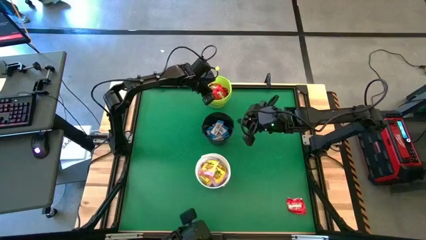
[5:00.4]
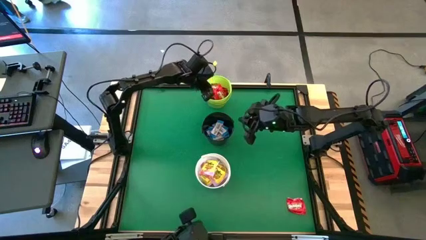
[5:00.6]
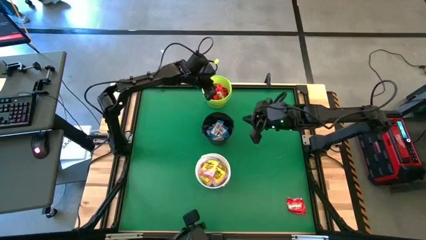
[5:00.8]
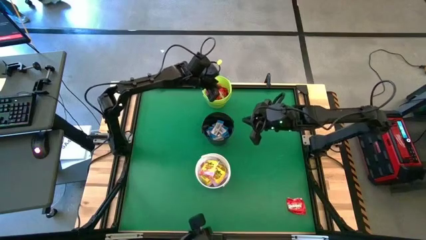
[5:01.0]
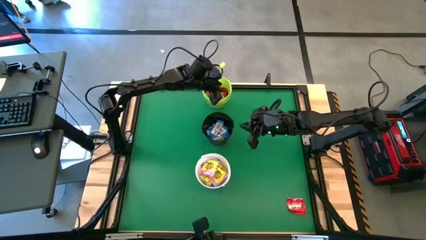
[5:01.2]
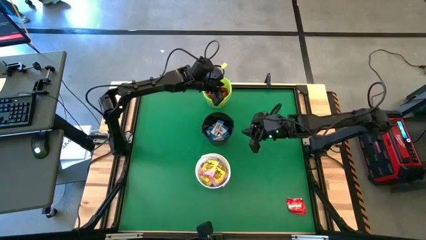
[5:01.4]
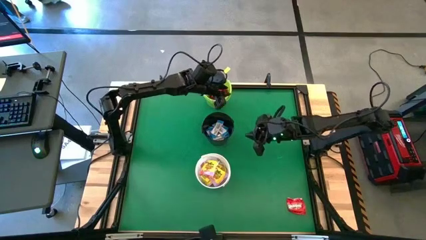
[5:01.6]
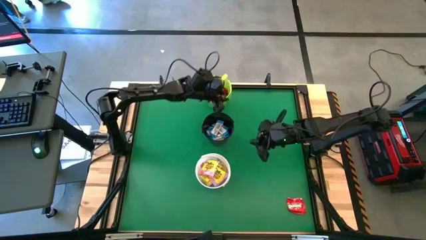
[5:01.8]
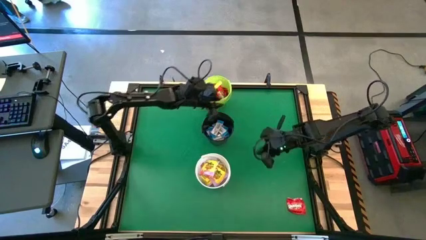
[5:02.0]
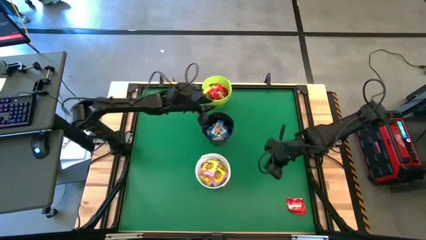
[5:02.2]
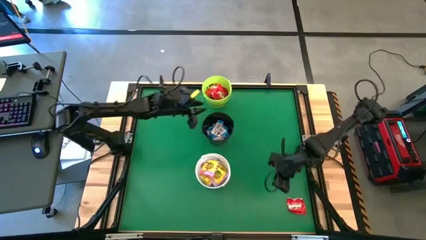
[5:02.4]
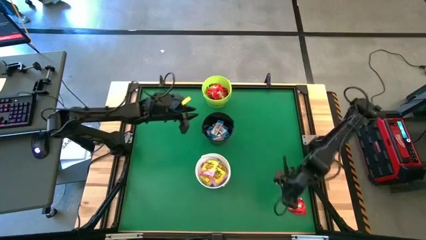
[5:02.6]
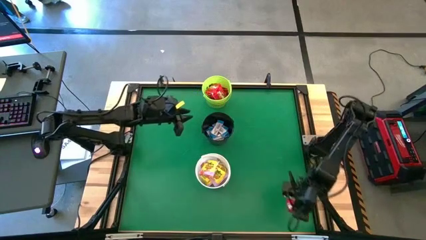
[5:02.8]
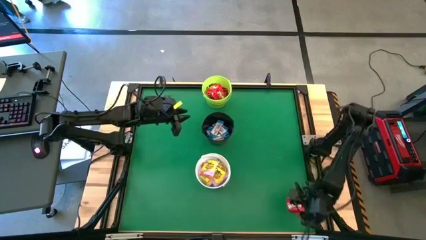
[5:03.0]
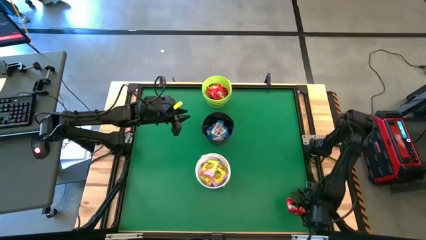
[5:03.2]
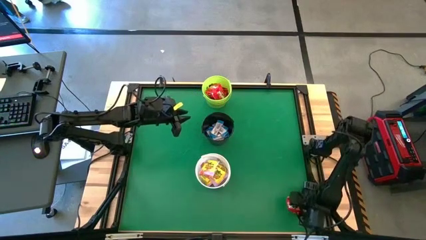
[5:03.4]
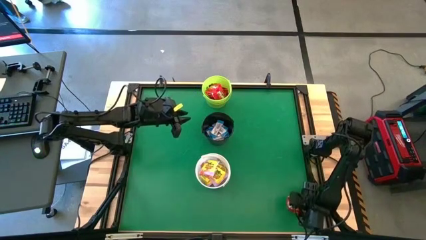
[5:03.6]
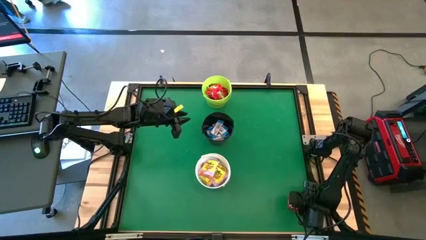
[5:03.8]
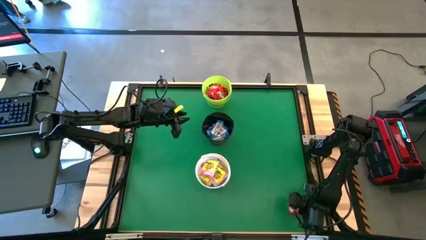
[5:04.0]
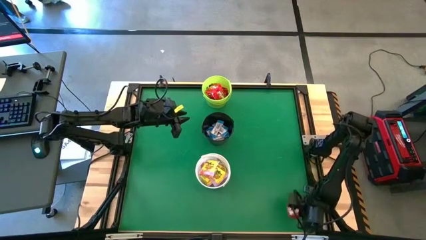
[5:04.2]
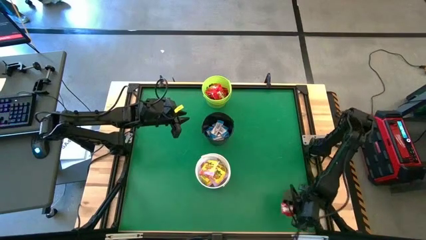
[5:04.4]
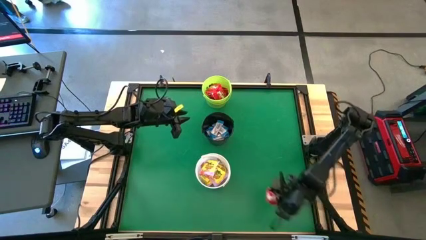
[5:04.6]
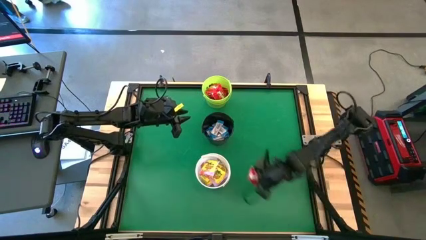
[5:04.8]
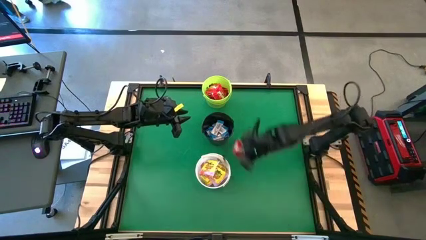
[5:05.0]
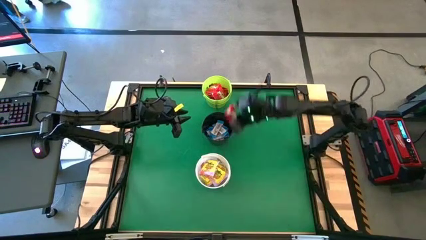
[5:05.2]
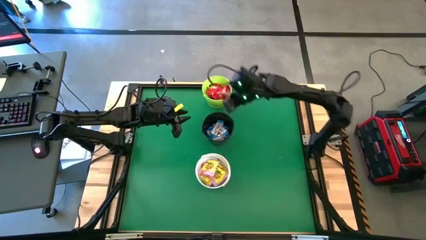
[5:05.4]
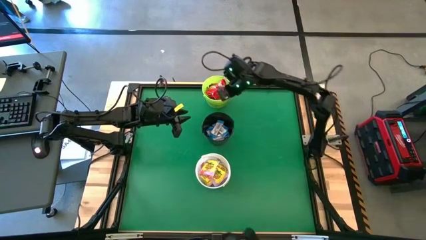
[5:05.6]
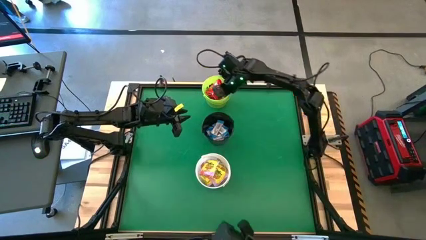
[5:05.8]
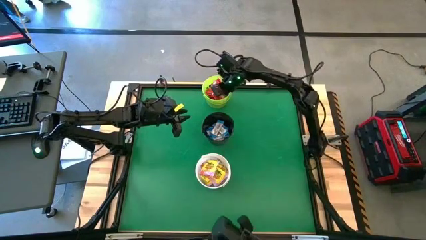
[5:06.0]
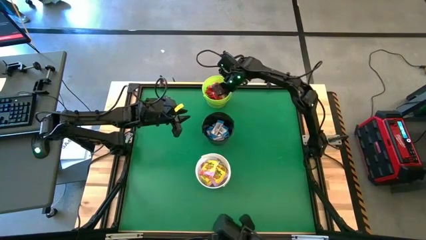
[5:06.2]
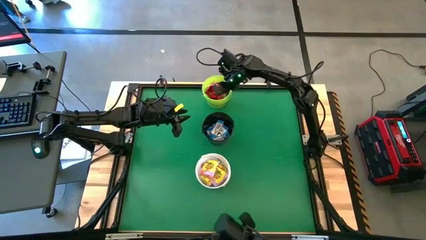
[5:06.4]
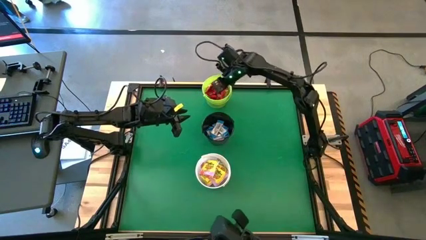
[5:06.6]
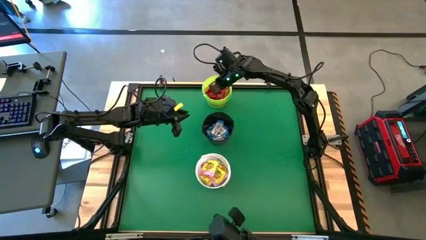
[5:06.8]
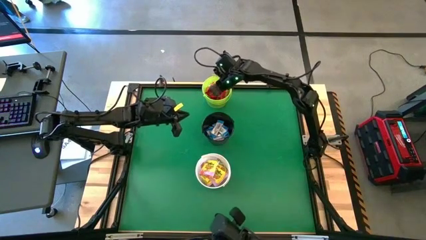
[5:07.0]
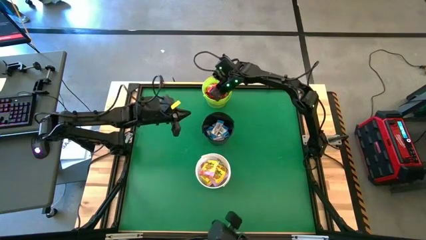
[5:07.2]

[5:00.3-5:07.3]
Task: Sort candy by brand, put in halloween buckets
Put the red candy into the green bucket

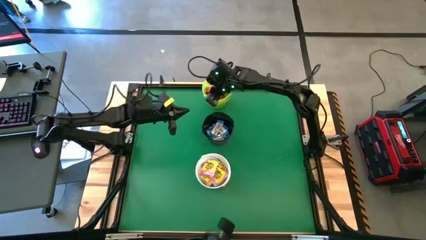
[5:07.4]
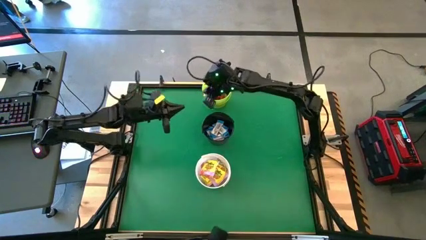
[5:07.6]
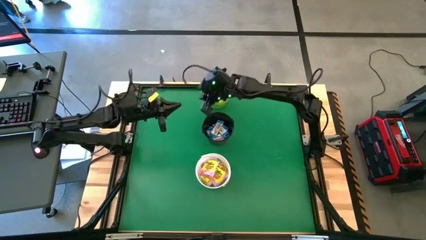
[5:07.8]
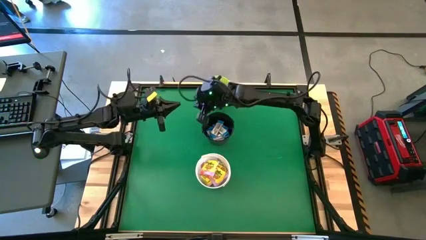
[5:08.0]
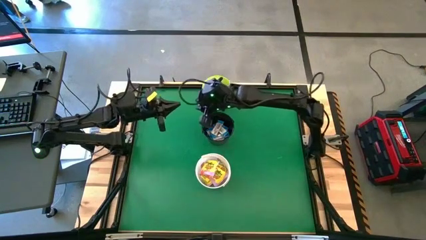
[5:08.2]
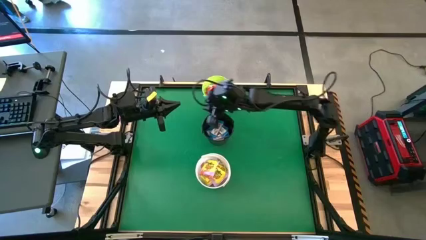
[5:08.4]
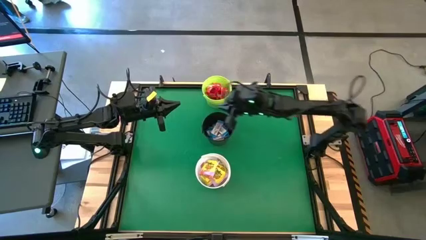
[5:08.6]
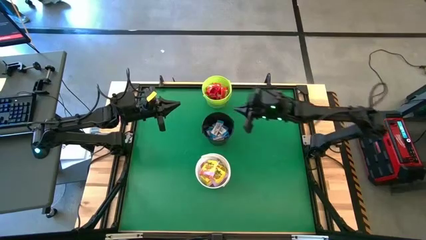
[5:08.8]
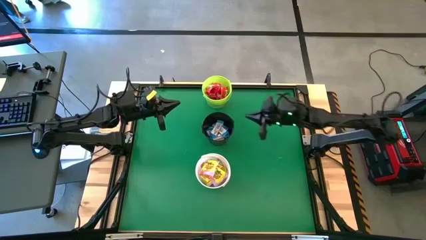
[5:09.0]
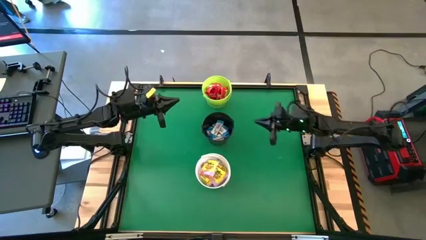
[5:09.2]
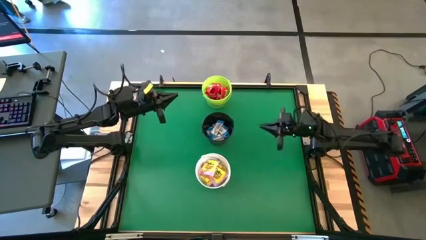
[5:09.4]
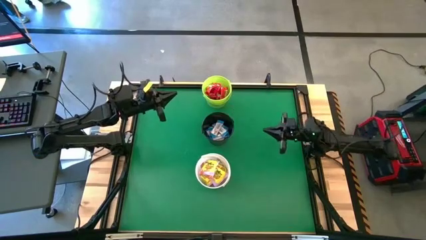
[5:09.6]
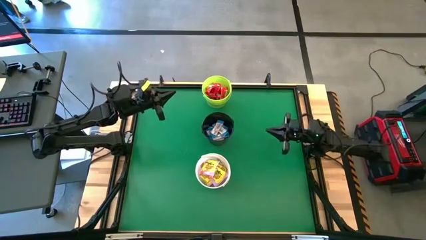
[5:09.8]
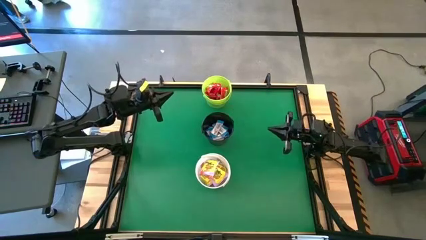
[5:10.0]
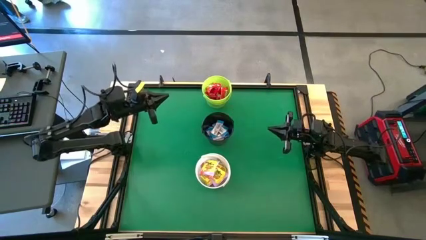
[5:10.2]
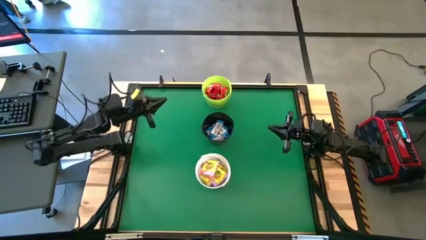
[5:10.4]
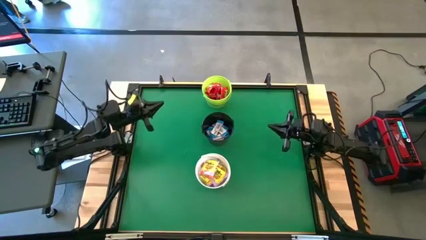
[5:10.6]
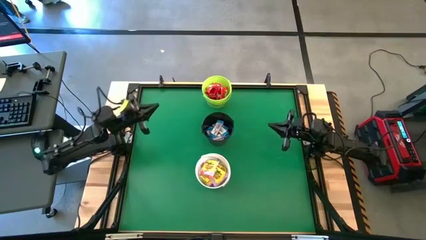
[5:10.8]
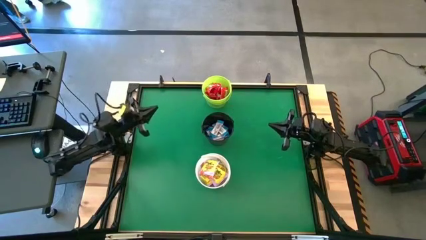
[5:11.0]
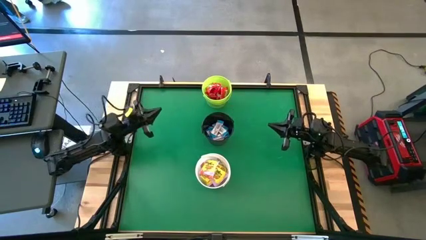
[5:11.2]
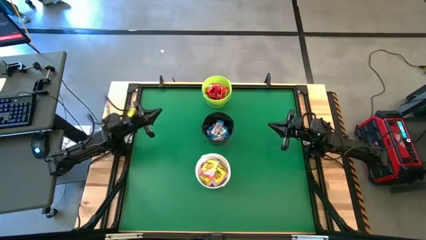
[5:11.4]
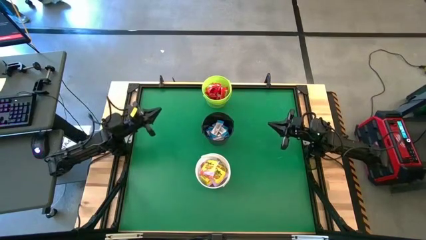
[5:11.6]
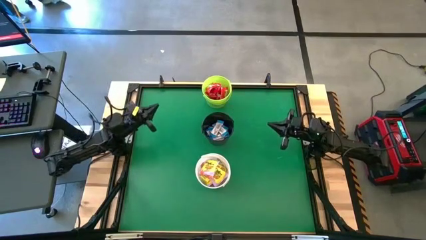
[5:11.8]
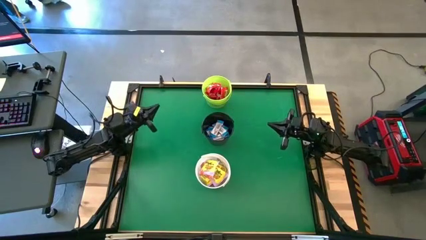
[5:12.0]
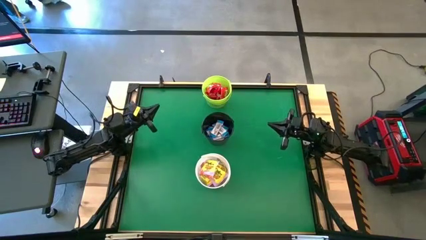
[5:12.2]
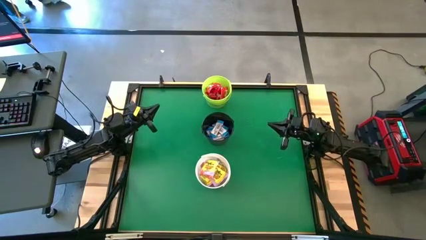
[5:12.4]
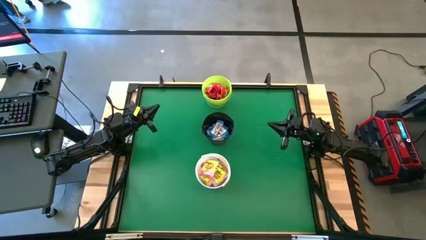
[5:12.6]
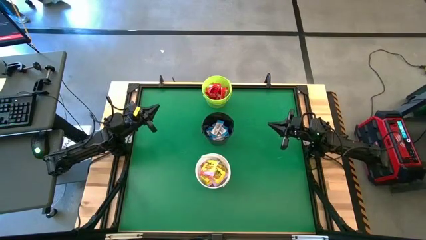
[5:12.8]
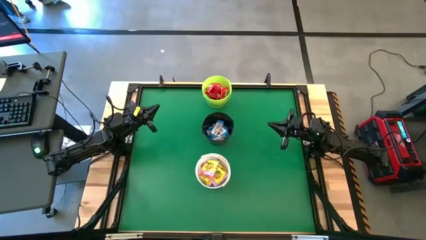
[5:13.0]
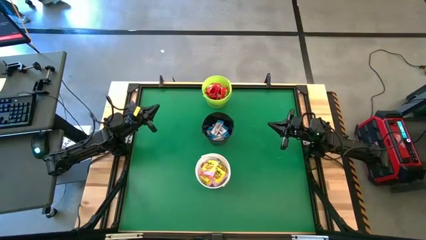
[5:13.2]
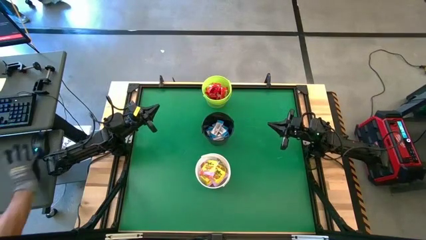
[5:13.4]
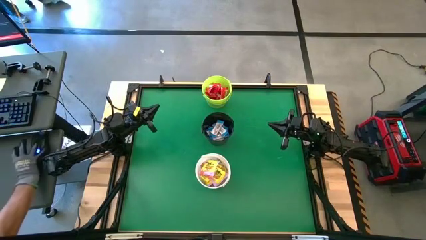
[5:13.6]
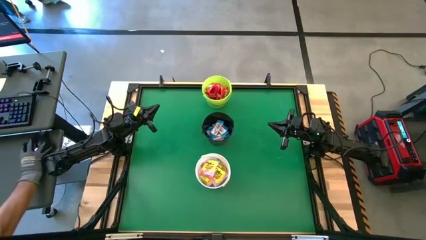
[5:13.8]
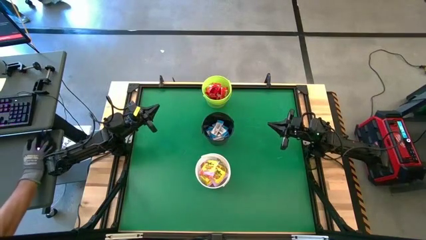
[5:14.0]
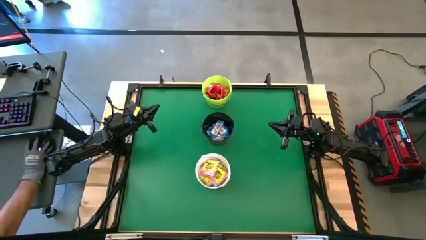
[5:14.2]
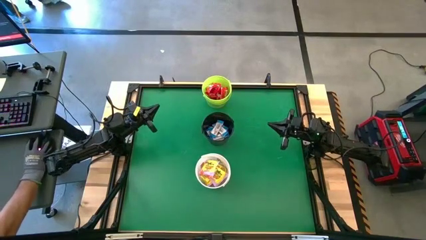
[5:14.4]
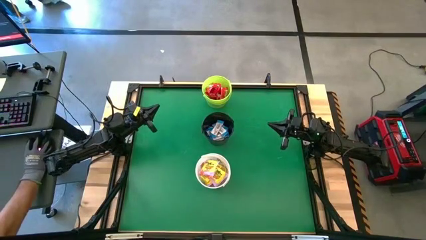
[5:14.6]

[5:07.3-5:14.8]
Return to Home Position
